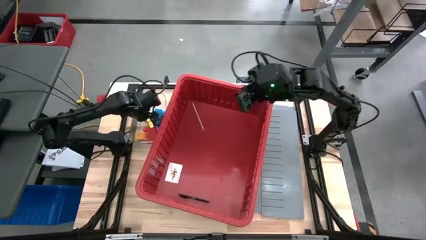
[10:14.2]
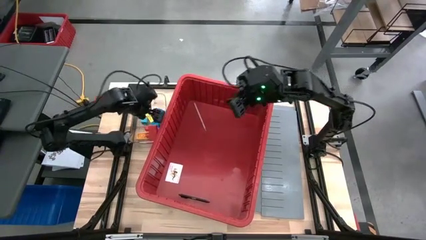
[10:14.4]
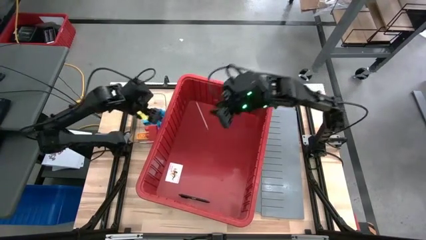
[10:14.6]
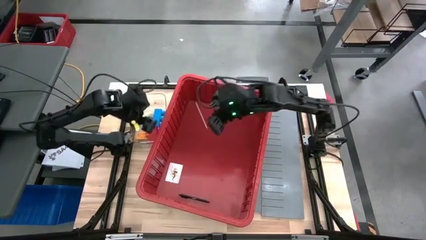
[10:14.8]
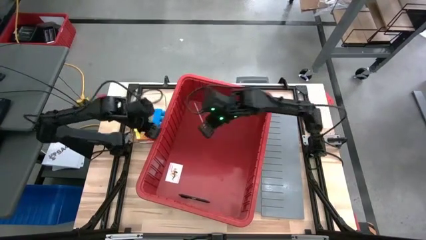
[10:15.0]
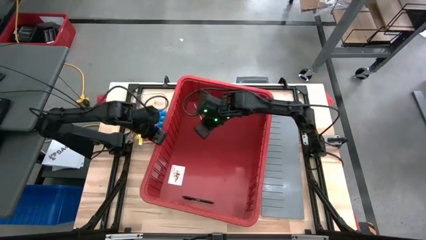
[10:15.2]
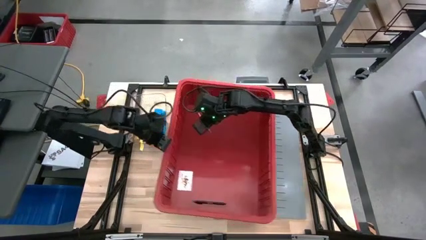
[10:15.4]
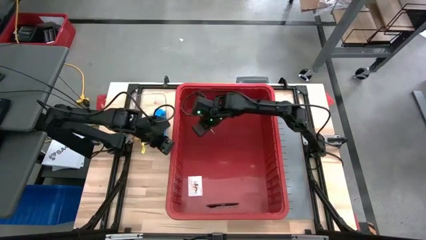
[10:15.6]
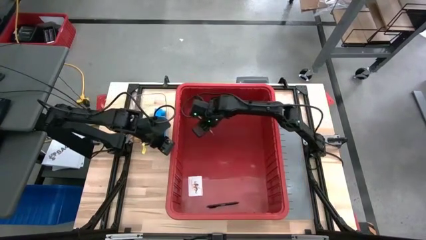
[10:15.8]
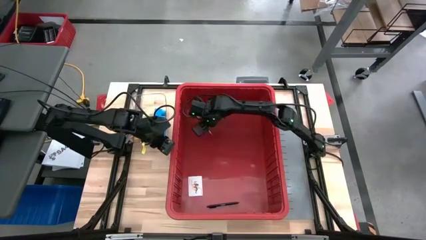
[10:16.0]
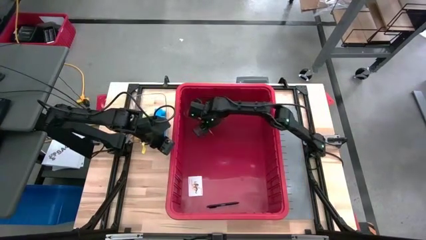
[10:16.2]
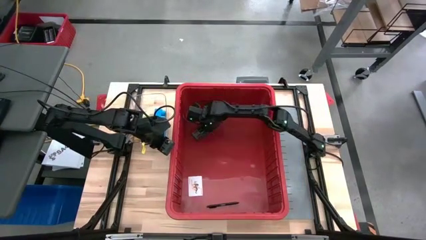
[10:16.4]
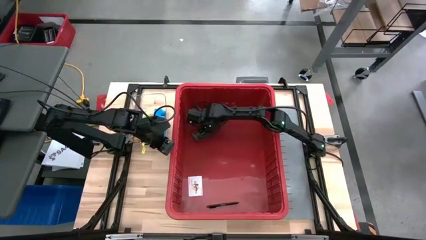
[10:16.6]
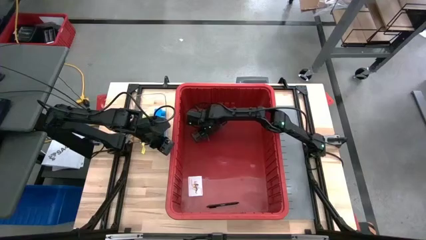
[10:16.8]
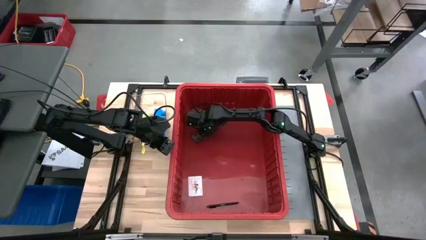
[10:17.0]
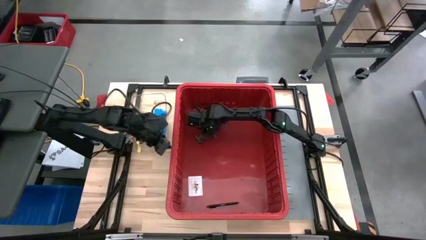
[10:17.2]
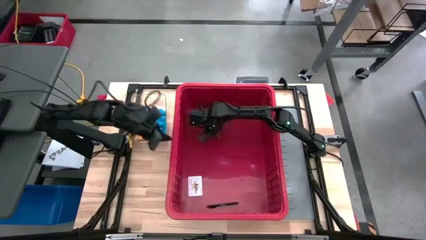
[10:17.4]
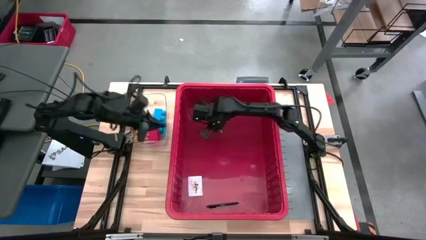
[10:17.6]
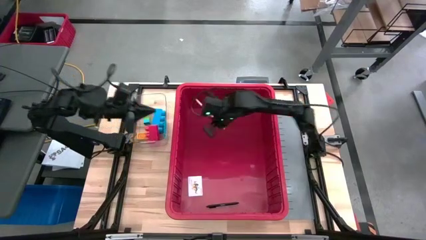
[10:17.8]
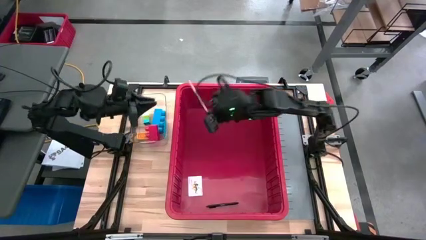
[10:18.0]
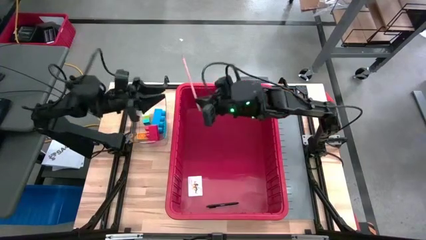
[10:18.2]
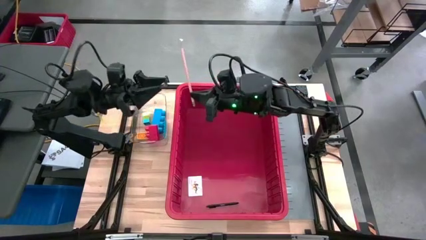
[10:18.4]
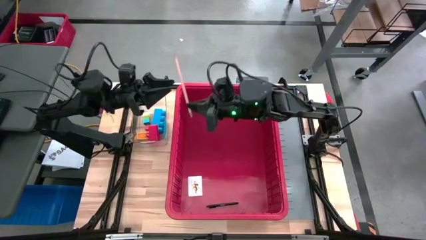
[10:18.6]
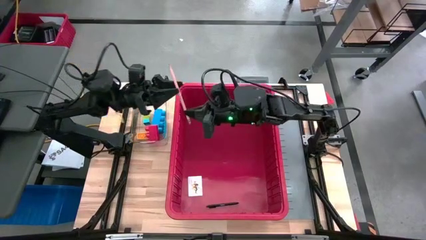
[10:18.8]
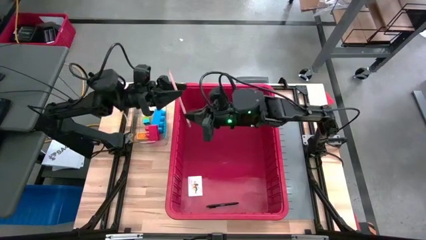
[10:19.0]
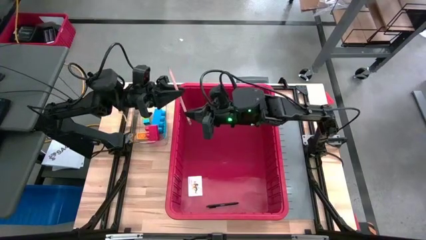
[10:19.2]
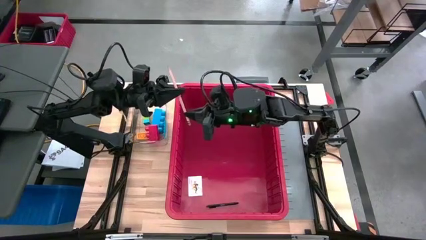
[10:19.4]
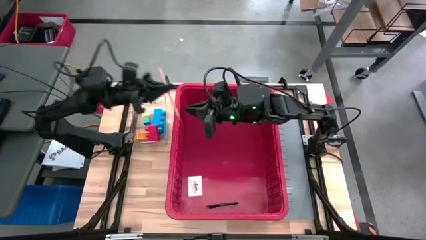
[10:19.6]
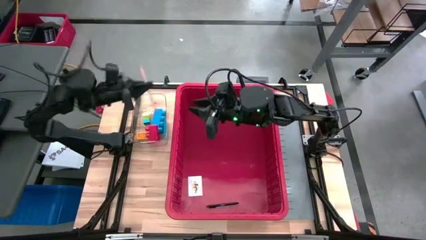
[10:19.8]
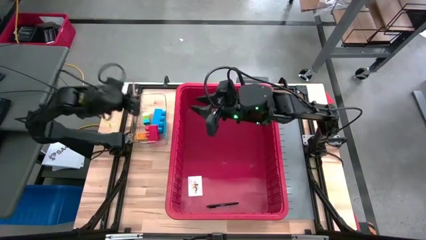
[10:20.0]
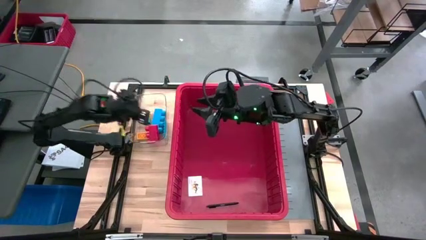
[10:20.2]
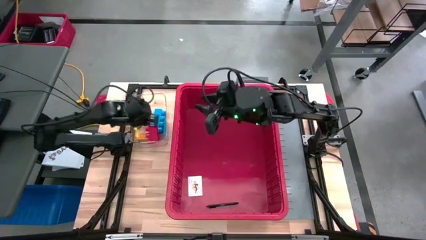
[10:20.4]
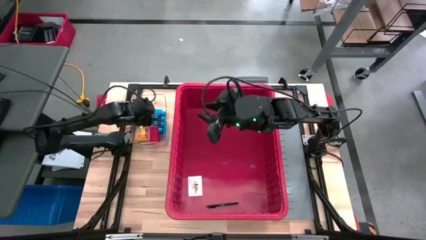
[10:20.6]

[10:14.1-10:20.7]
Task: Sort blocks
Remove the brown pencil from the bin

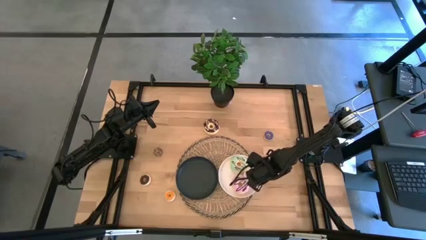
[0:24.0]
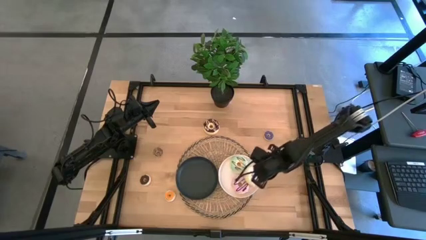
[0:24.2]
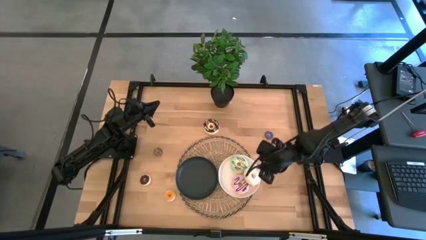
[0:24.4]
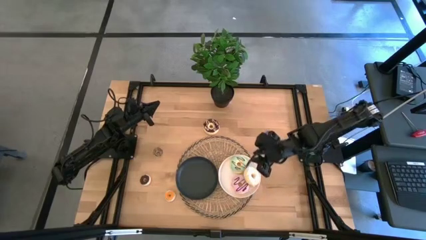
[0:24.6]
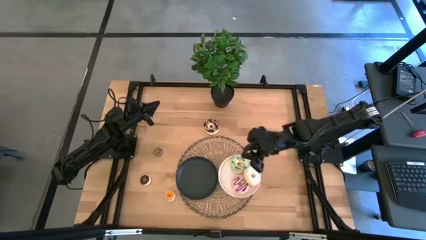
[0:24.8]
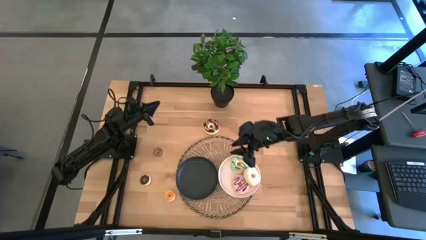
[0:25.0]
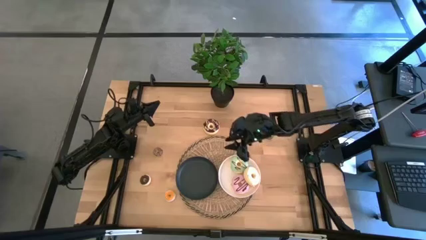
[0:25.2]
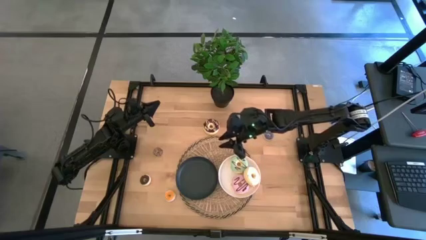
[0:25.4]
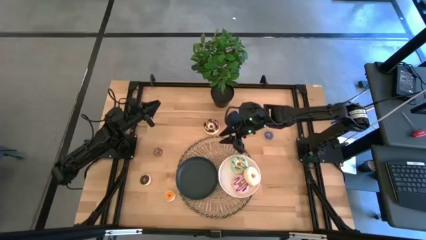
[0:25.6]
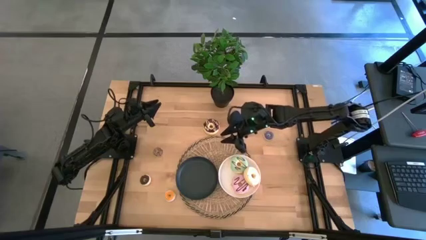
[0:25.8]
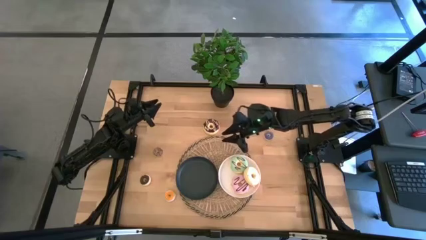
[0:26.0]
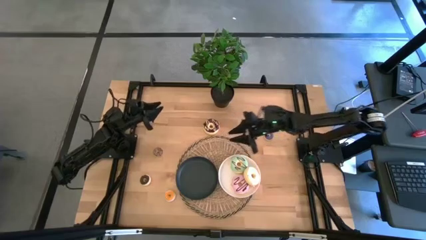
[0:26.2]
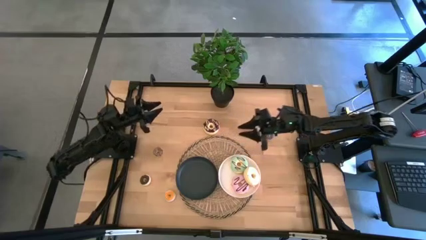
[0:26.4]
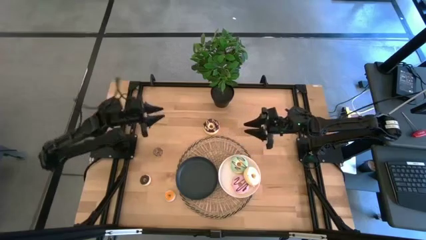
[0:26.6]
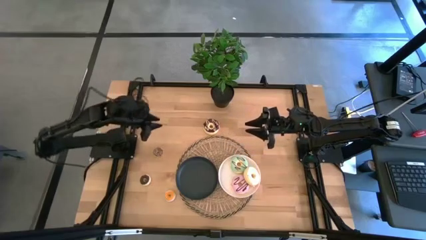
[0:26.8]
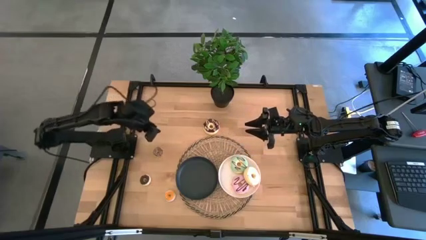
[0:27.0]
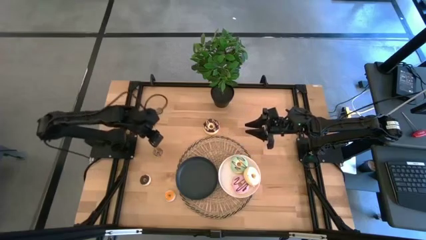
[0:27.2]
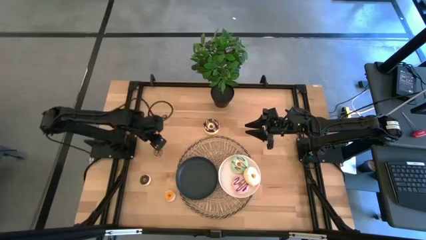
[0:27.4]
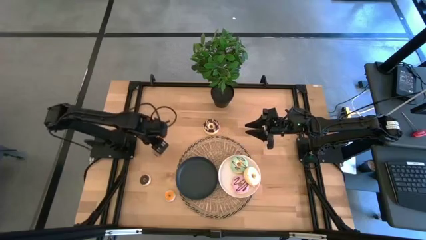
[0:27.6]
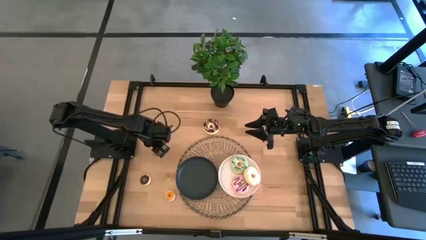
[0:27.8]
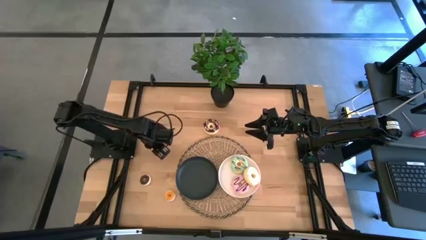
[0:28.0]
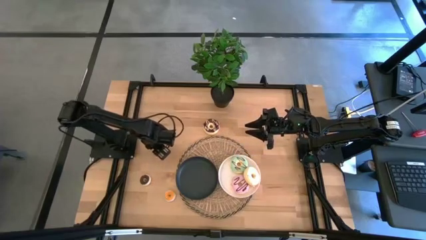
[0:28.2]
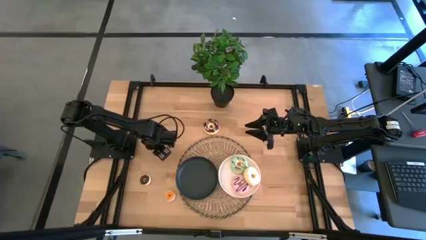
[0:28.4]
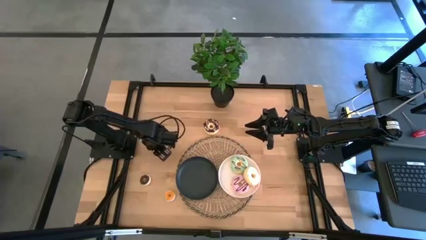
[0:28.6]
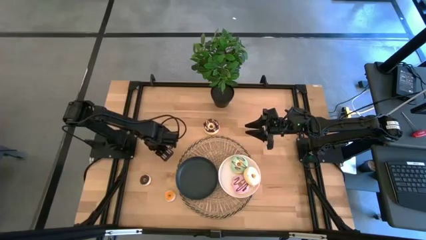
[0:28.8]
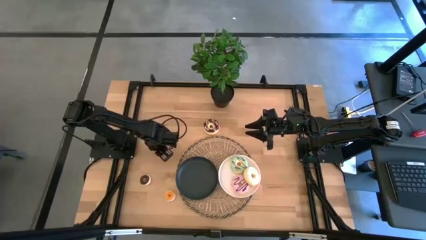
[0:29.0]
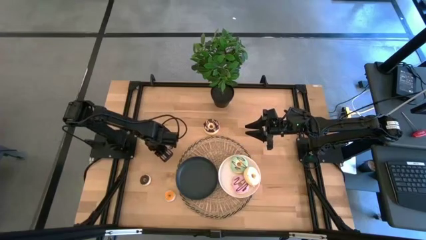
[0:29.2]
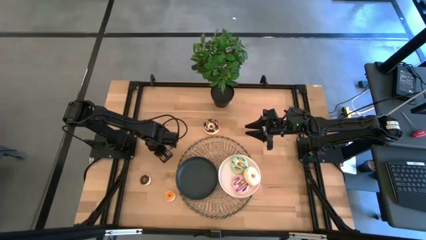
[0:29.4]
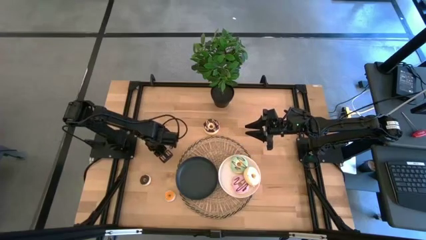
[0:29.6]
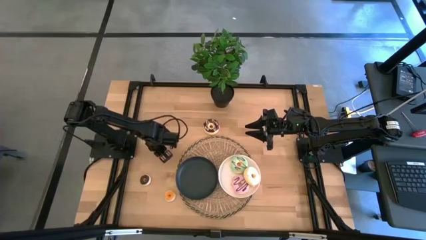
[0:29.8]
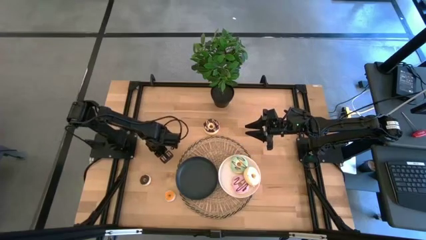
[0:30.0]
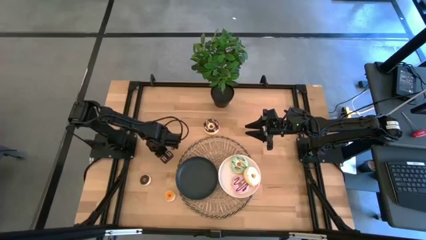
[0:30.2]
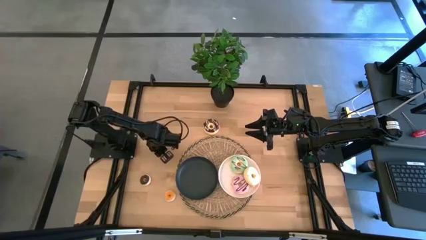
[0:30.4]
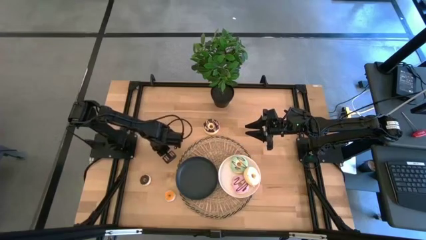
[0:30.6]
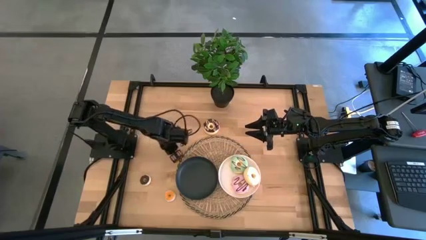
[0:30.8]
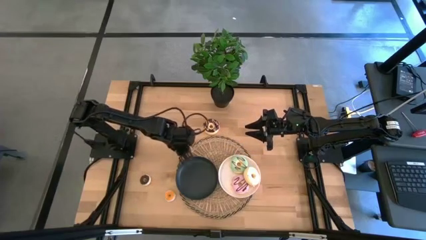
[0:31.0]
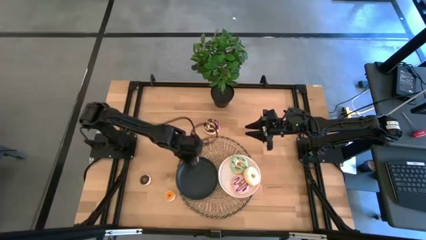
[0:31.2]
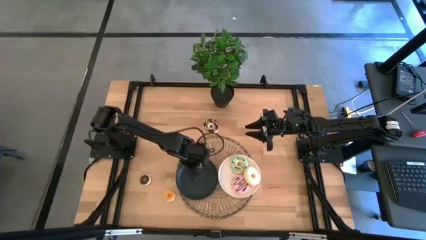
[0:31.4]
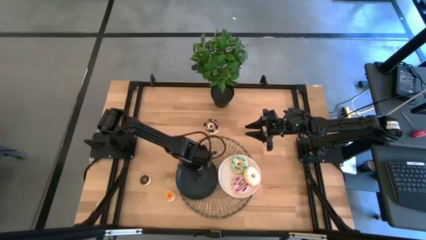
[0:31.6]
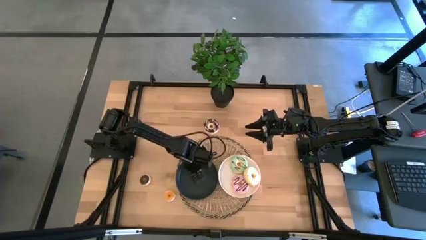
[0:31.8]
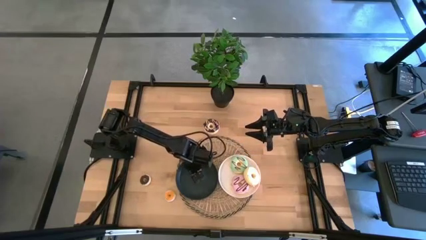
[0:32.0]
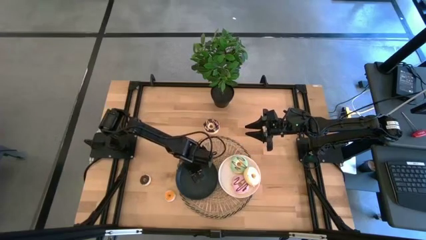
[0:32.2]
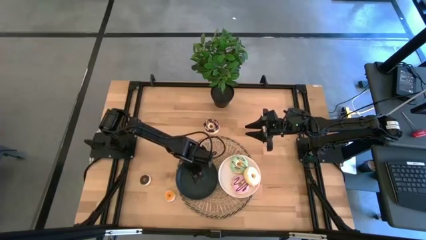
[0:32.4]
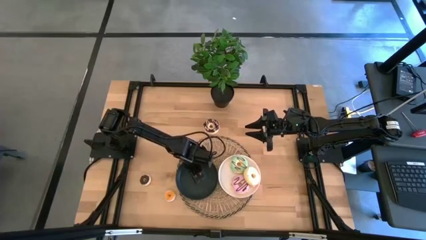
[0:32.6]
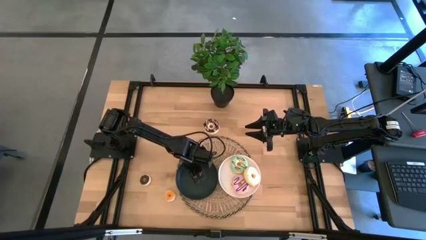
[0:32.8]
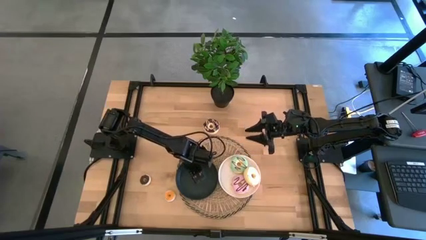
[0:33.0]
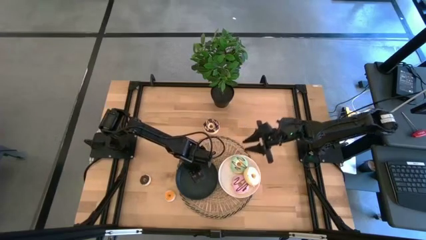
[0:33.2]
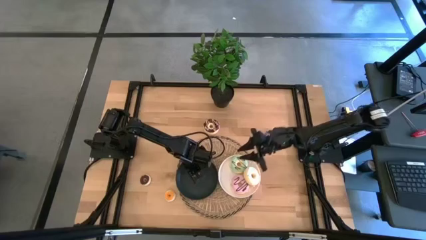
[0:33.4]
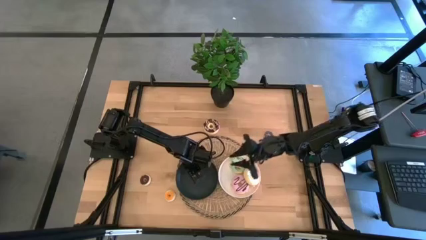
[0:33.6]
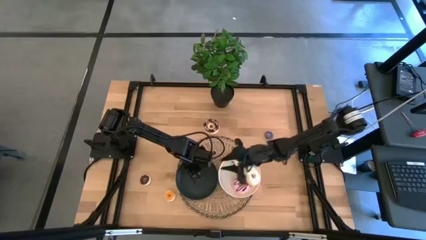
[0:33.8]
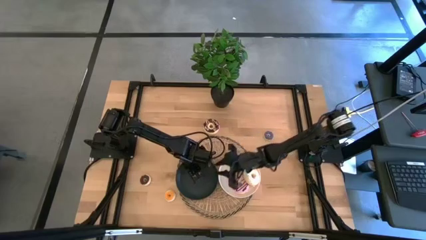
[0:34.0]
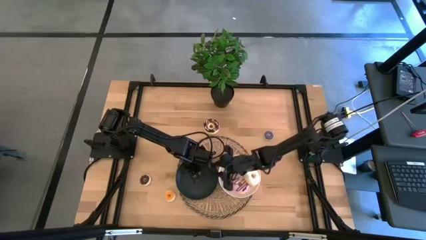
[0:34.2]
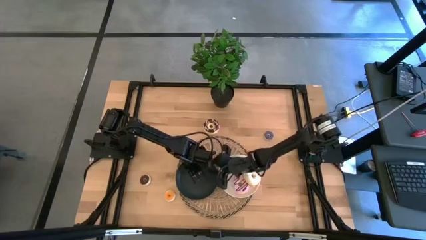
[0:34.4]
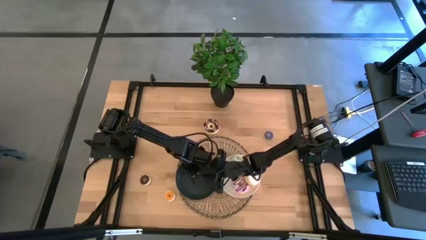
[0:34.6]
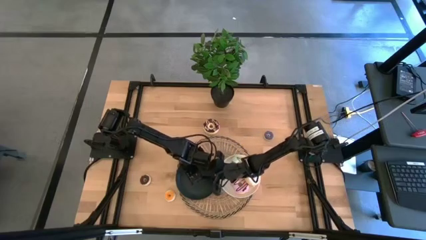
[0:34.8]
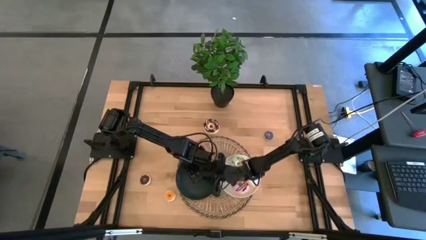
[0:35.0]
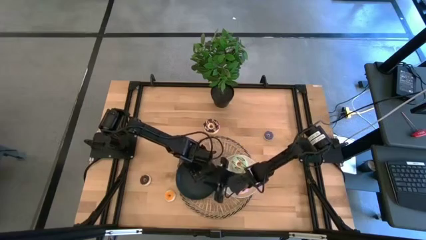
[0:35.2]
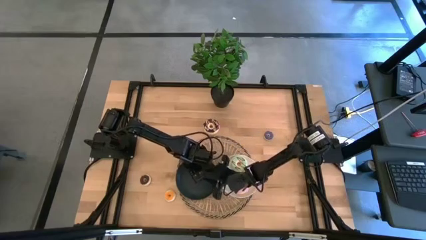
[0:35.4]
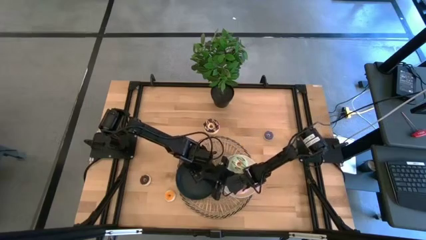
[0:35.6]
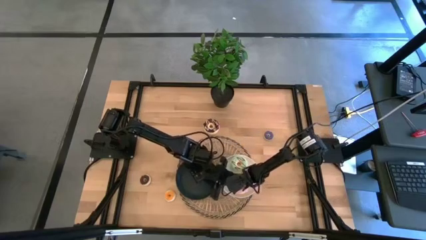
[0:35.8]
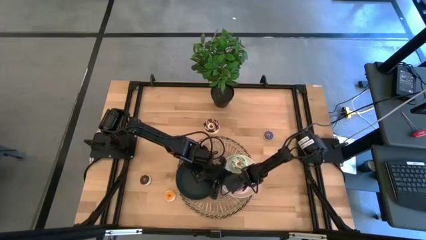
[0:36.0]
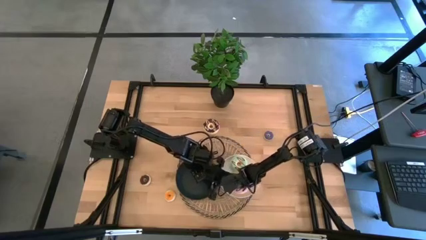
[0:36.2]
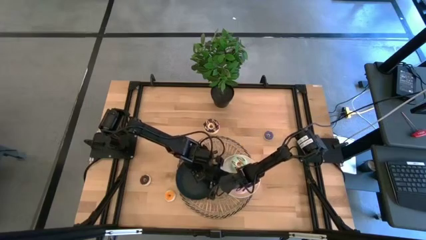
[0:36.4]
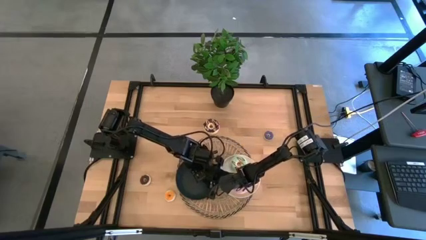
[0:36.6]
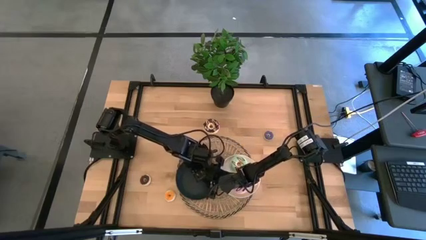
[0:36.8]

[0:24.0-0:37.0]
Task: Pick & Place donuts
Put the small brown donut on the black plate
